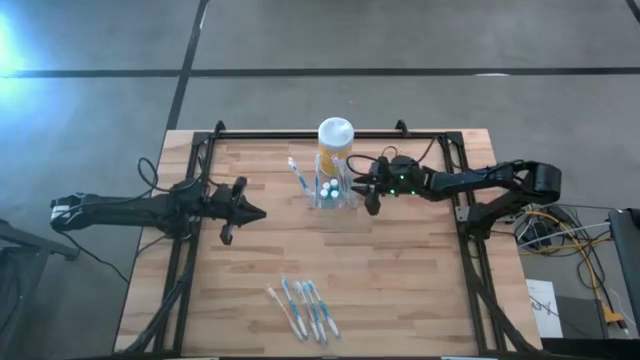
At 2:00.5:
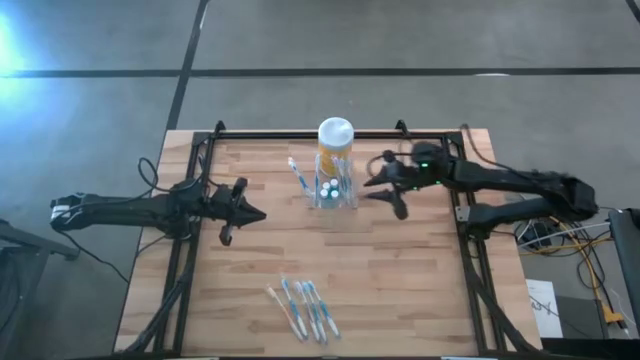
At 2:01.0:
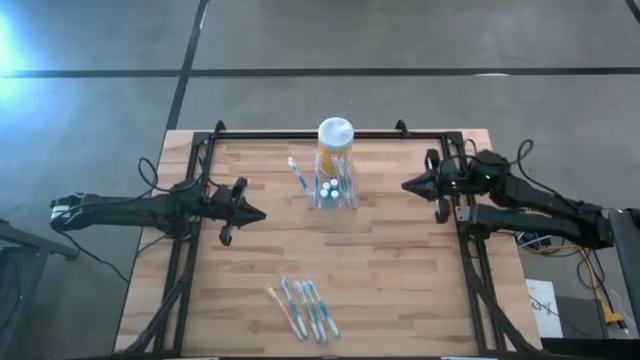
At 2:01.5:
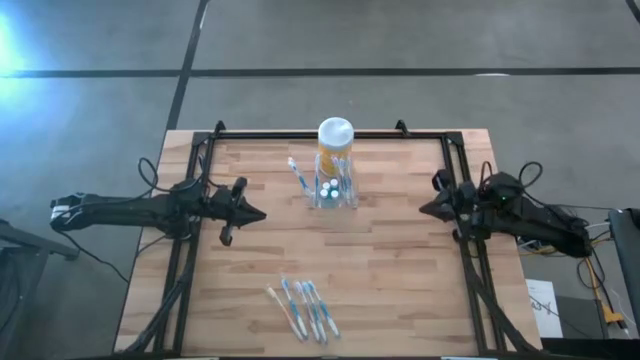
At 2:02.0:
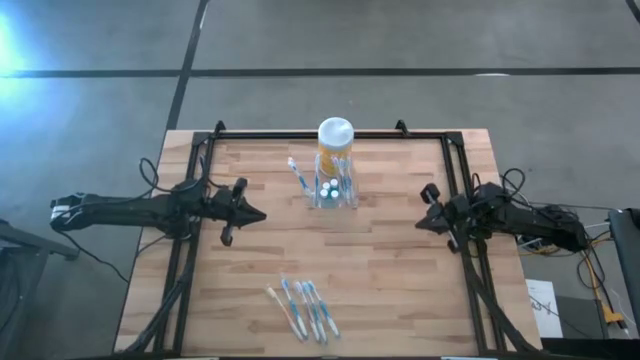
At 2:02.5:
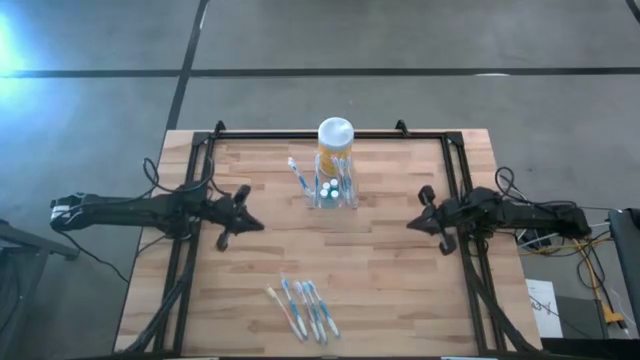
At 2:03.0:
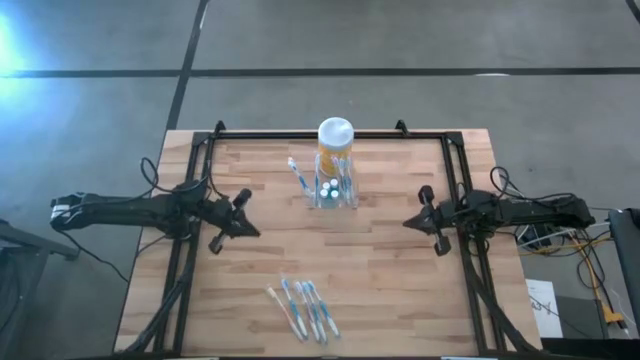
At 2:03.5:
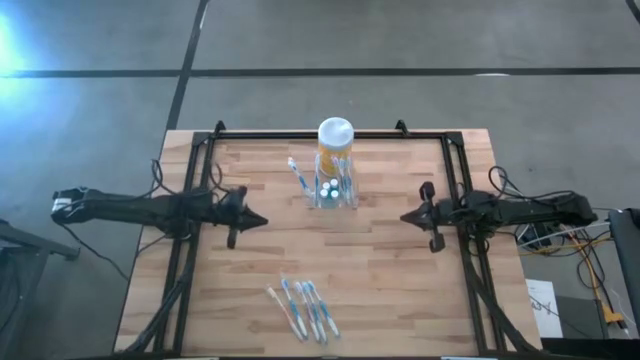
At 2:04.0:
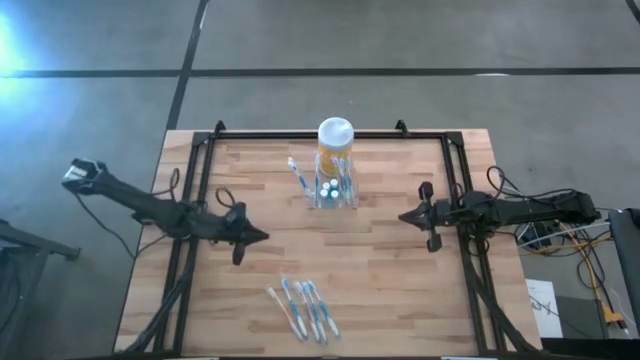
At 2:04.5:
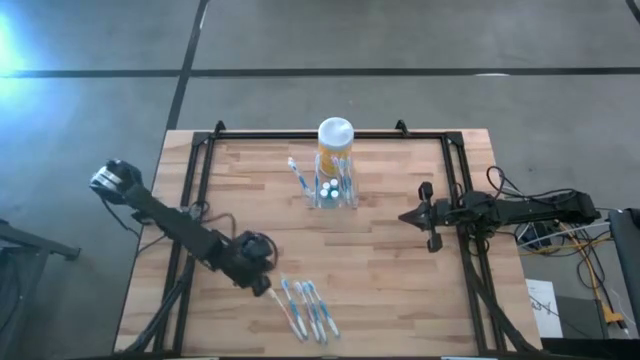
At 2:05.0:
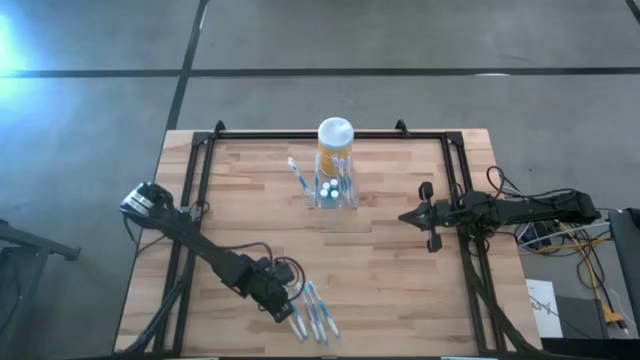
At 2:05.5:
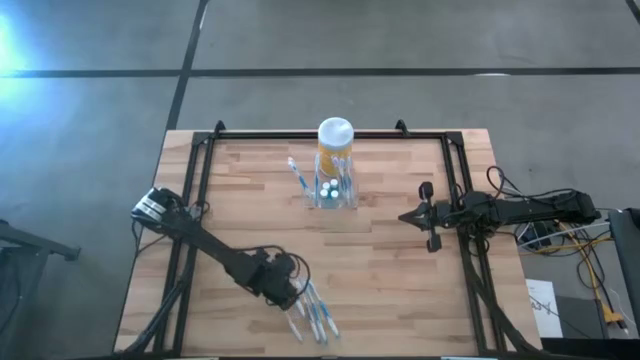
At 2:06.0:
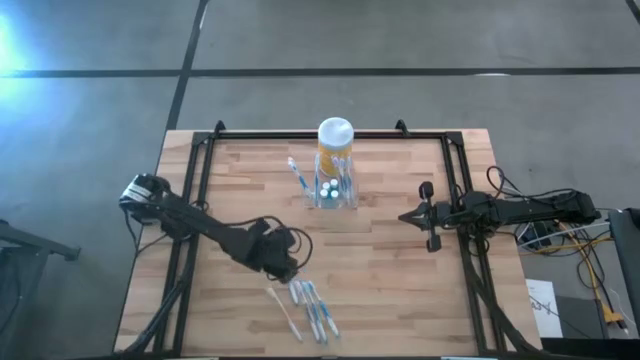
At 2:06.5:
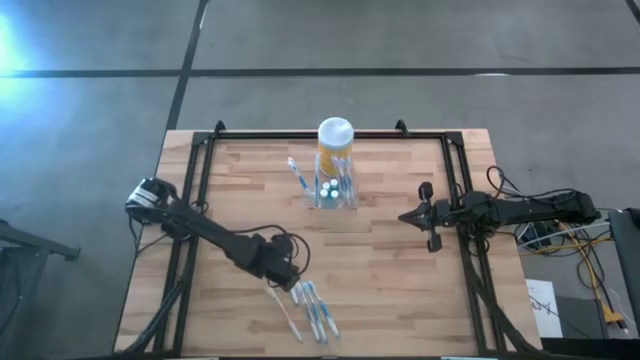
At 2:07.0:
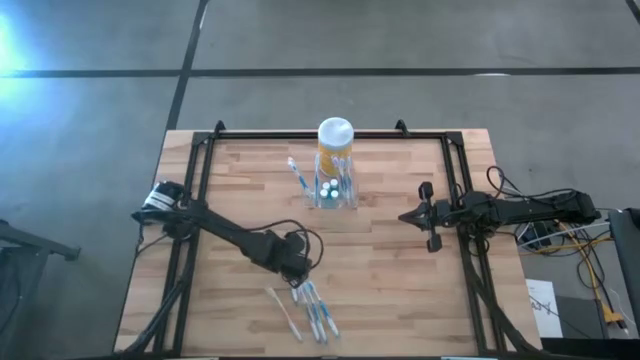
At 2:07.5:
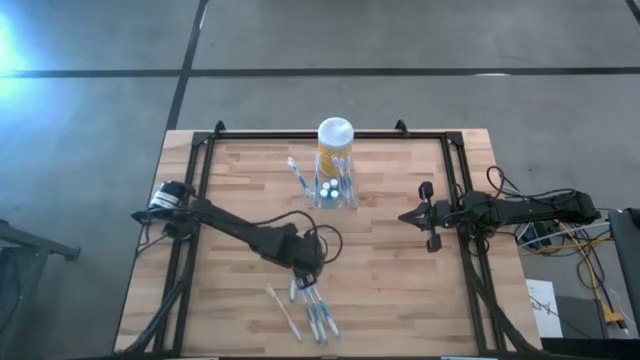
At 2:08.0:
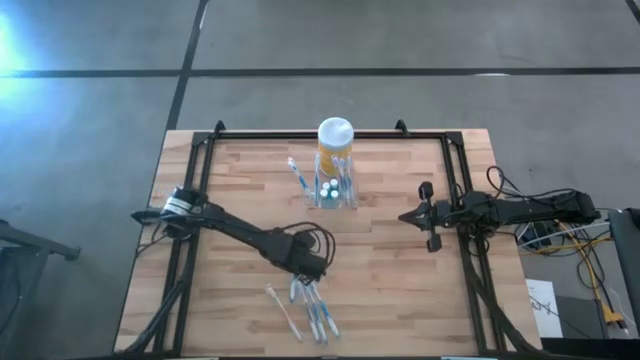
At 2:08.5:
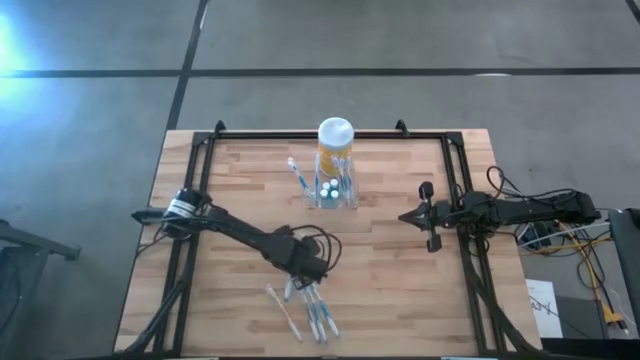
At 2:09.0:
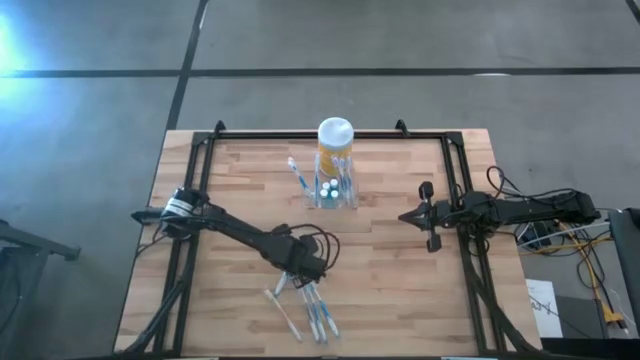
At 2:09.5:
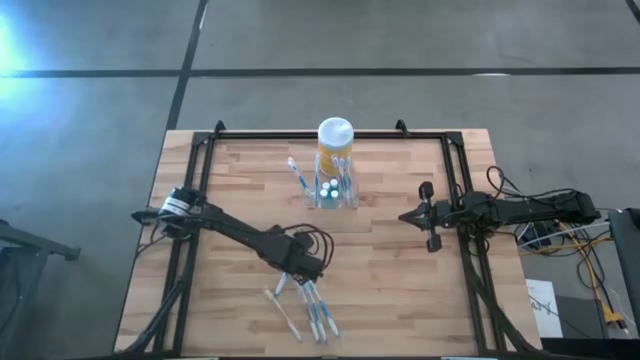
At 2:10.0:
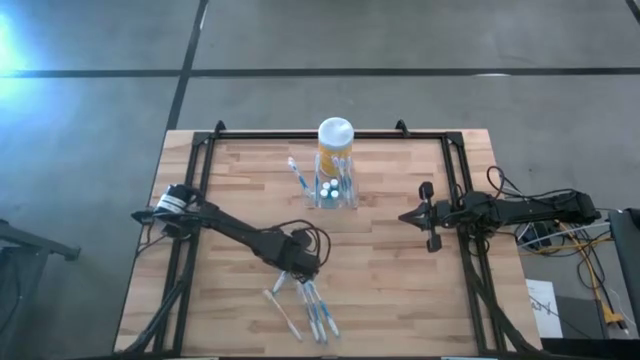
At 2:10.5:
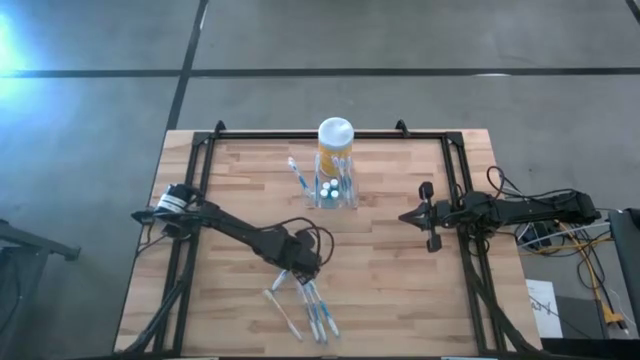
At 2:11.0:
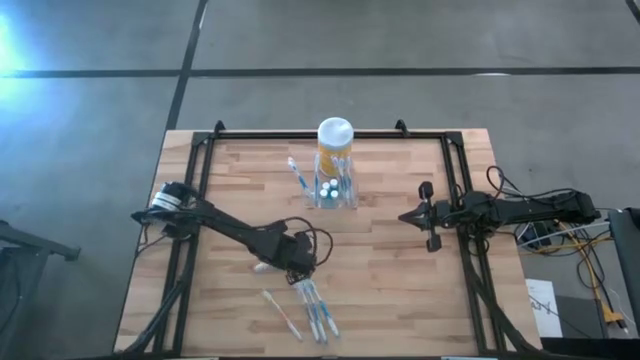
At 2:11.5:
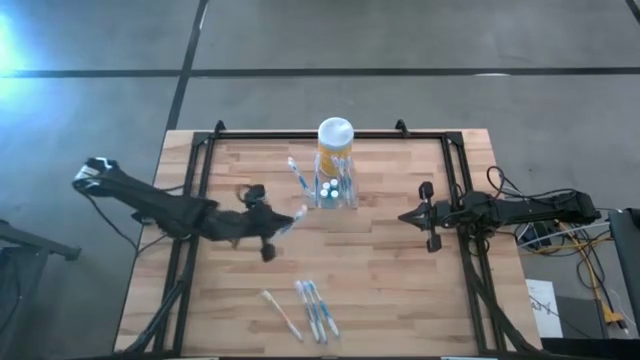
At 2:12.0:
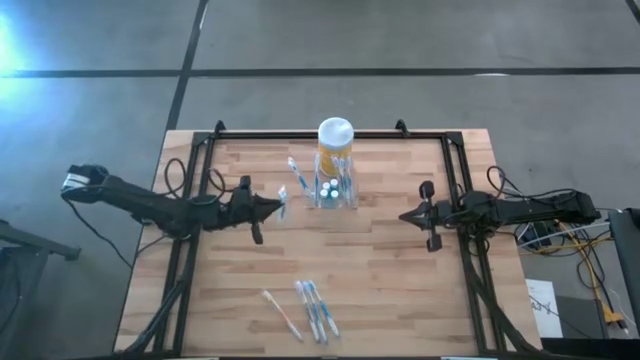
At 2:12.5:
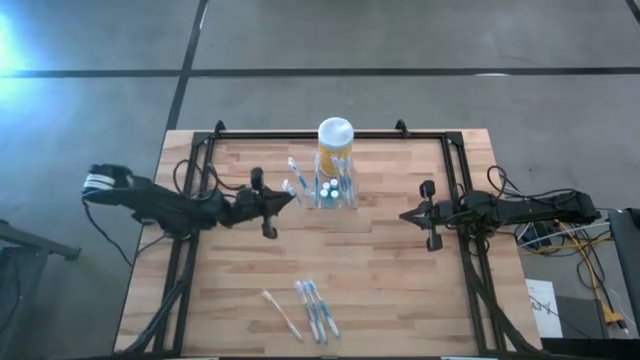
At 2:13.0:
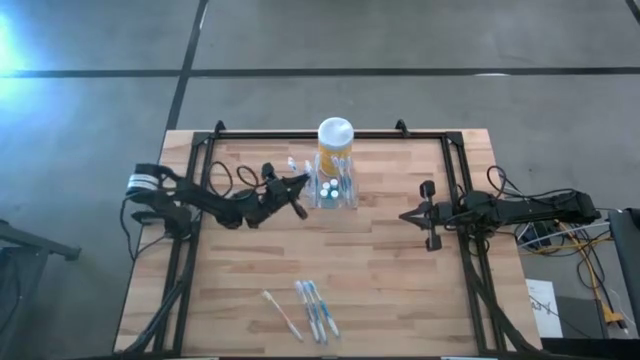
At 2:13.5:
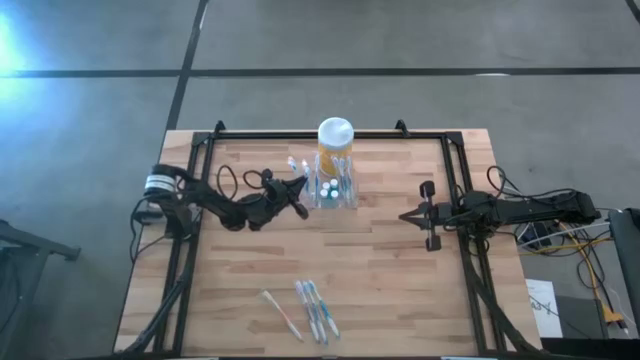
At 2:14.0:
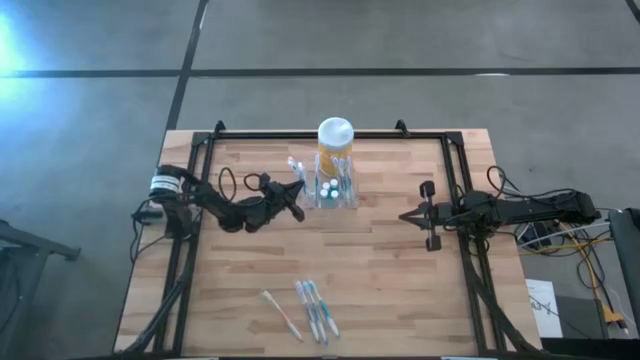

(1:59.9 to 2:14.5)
Task: Pick & Place toothbrushing station
Put the blue toothbrush into the transparent organizer

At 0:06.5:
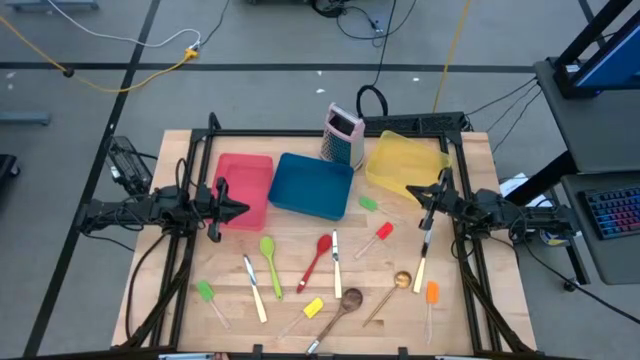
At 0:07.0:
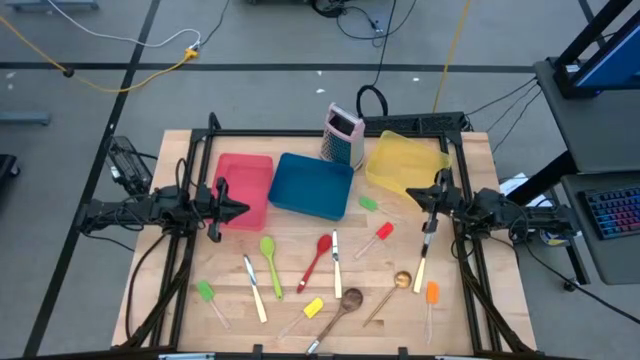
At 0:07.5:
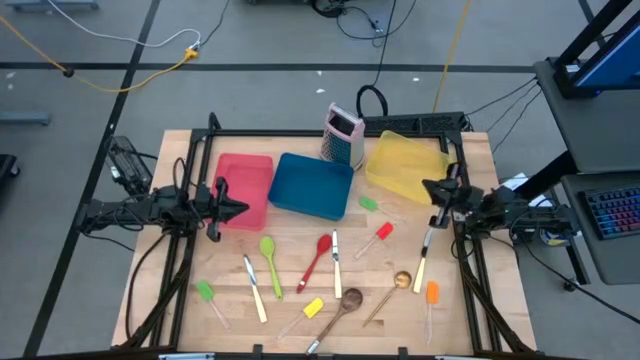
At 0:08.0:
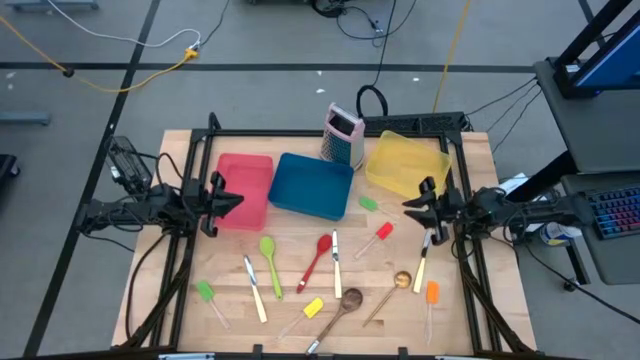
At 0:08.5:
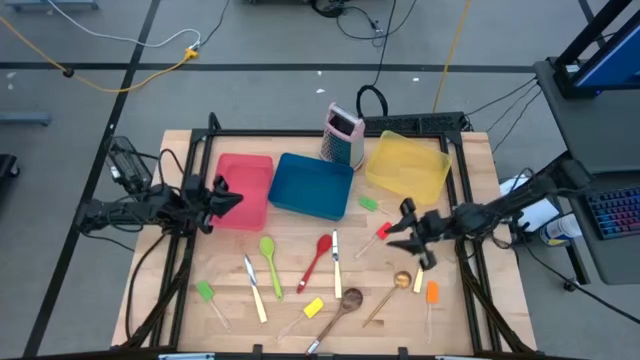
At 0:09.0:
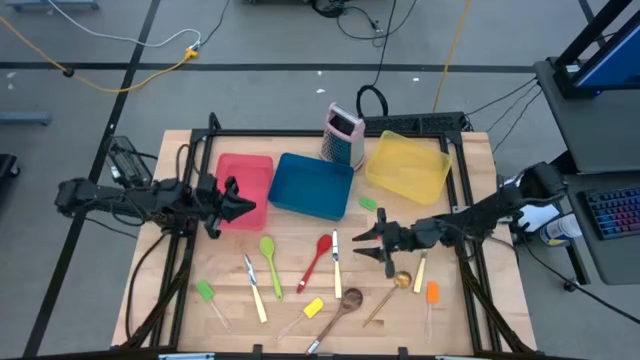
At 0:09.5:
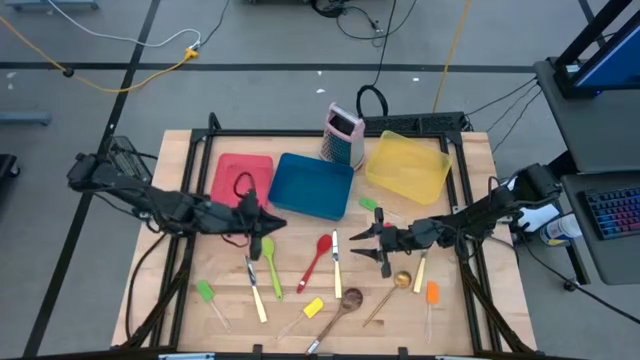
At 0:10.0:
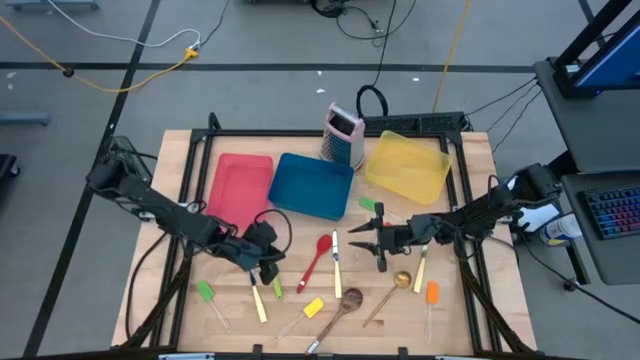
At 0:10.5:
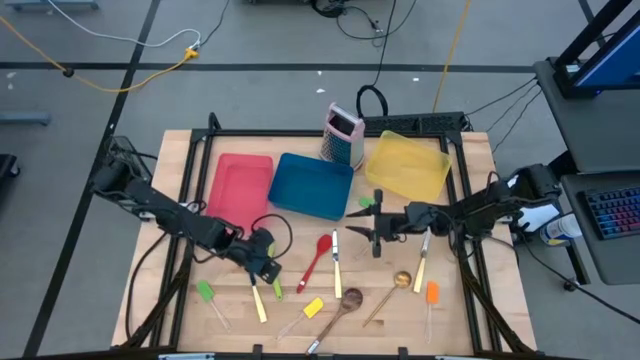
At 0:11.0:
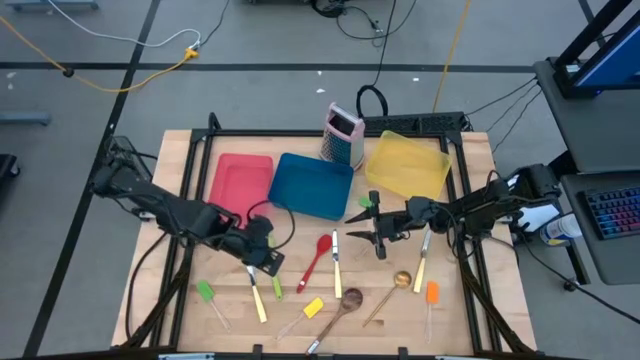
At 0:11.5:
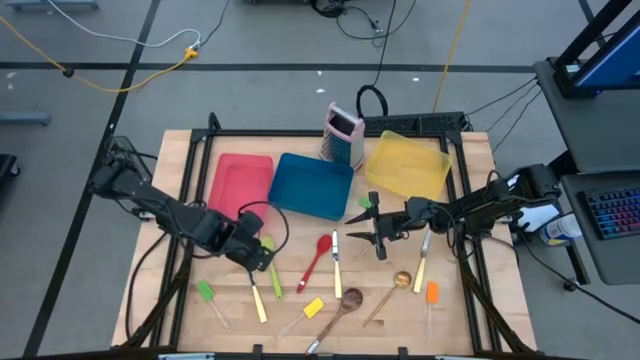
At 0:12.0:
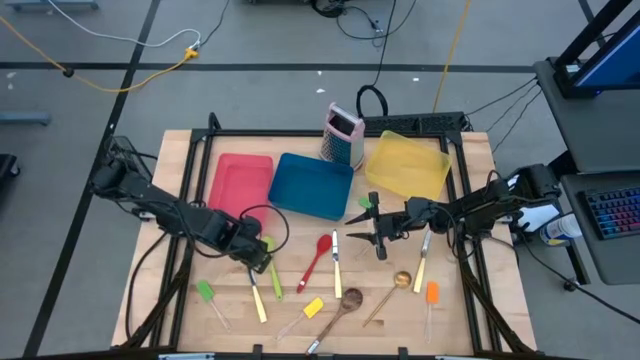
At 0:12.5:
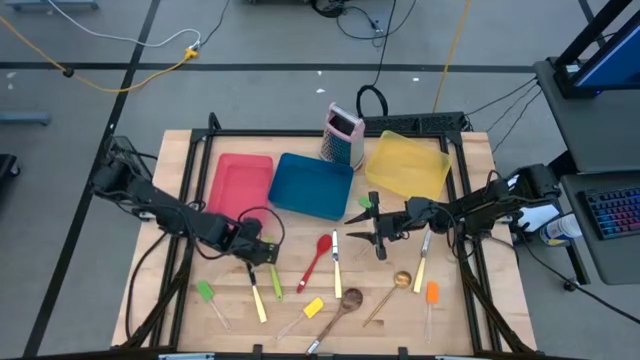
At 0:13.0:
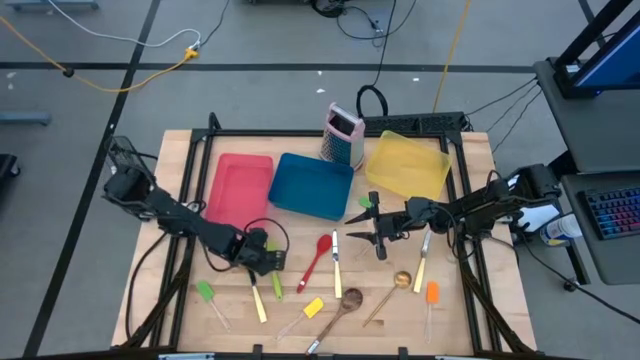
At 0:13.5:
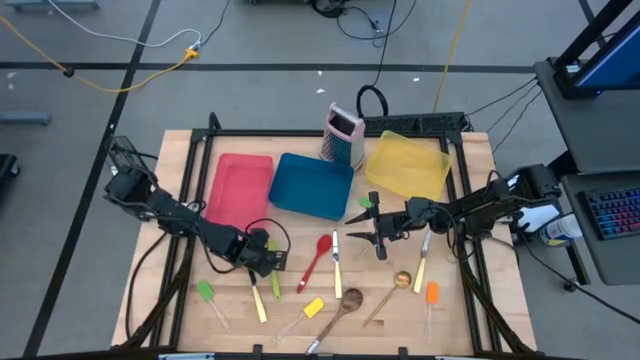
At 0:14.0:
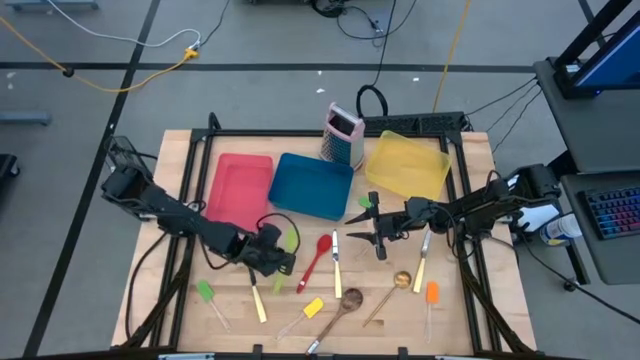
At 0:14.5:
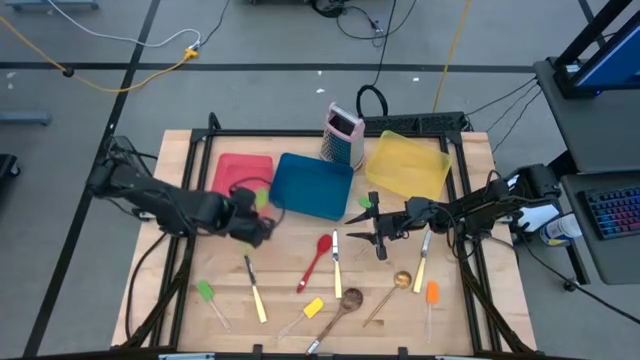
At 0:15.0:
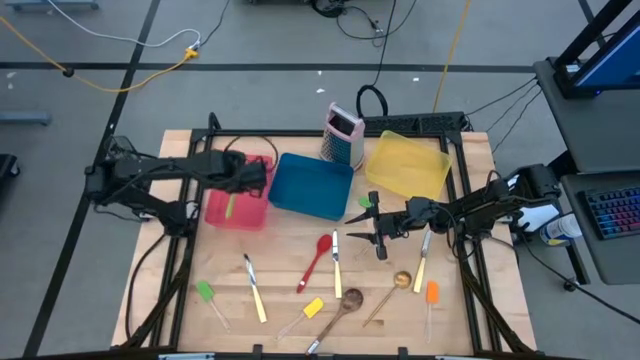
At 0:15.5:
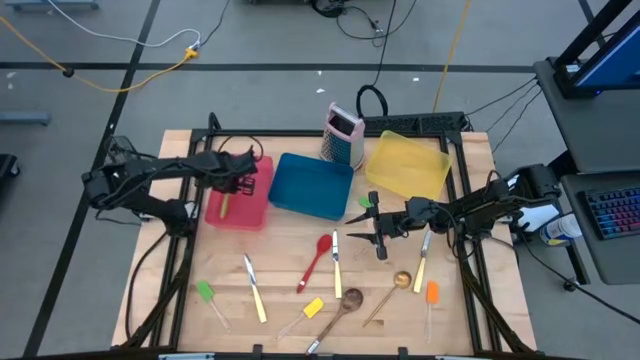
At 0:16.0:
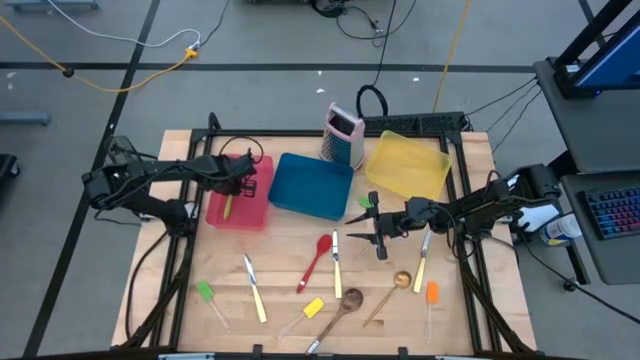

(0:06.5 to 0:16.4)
Task: Pick & Place Kitchen Items
Put the green spoon into the red bin
